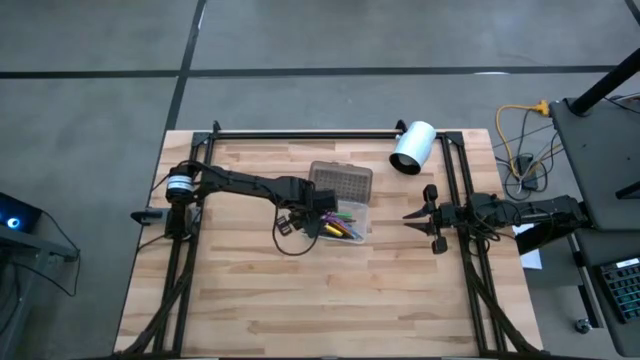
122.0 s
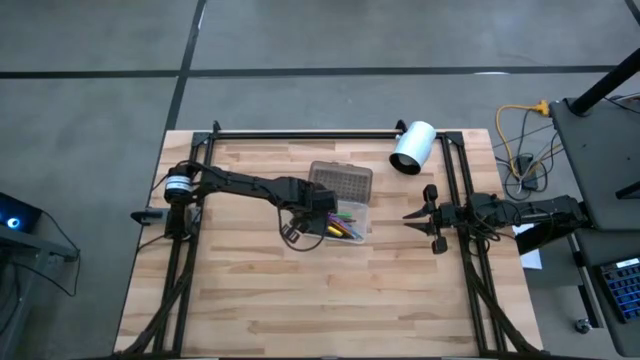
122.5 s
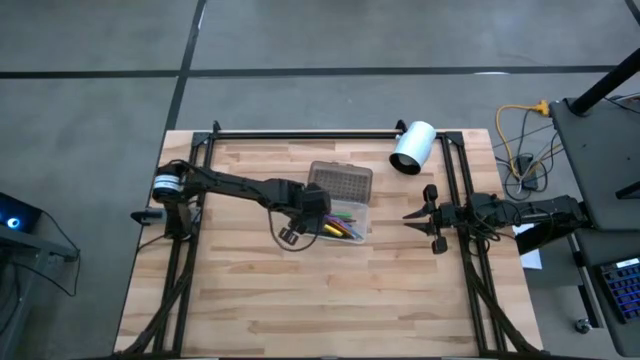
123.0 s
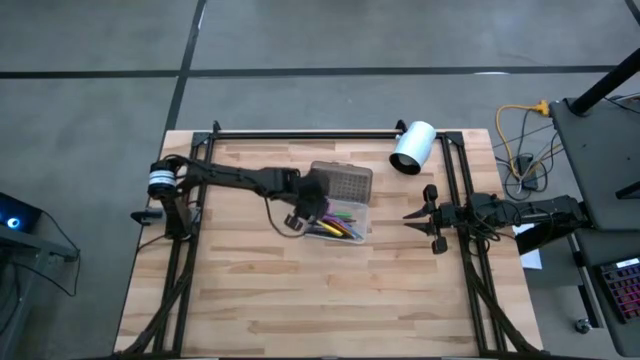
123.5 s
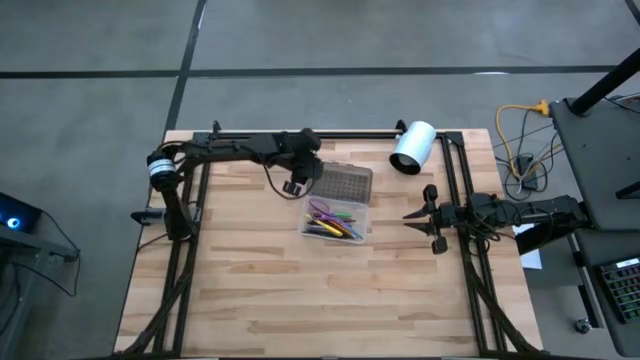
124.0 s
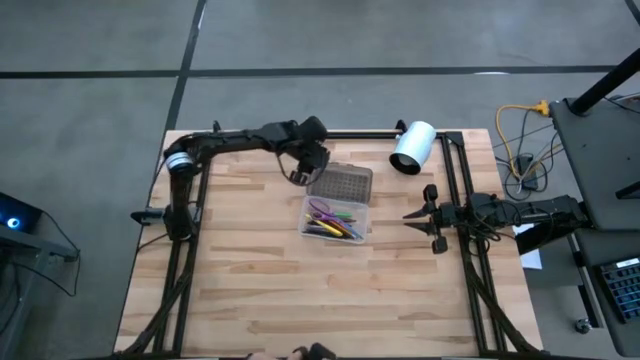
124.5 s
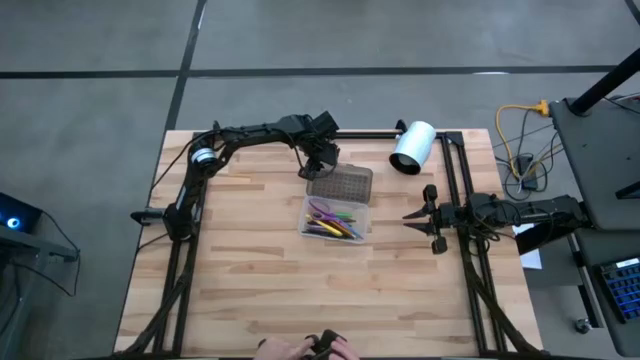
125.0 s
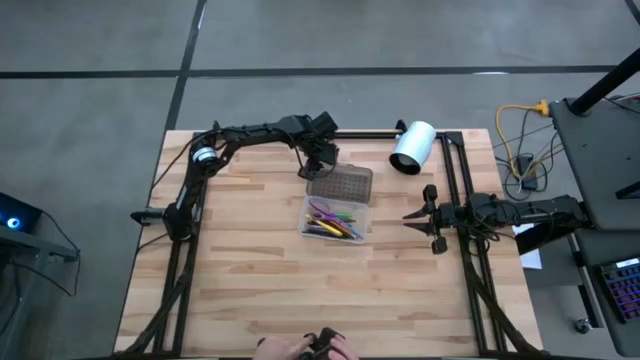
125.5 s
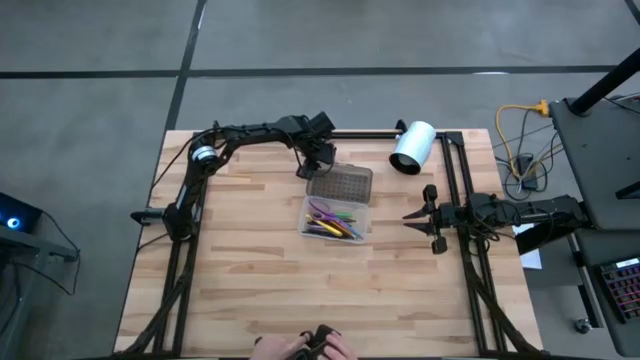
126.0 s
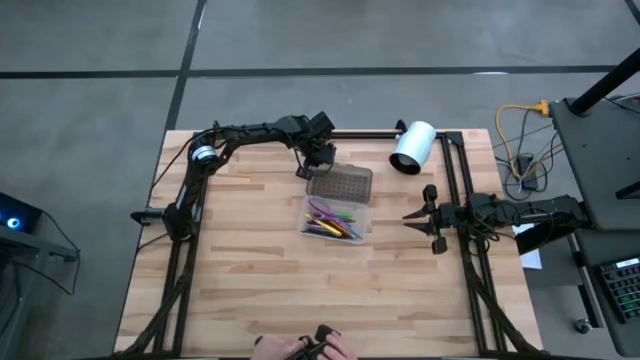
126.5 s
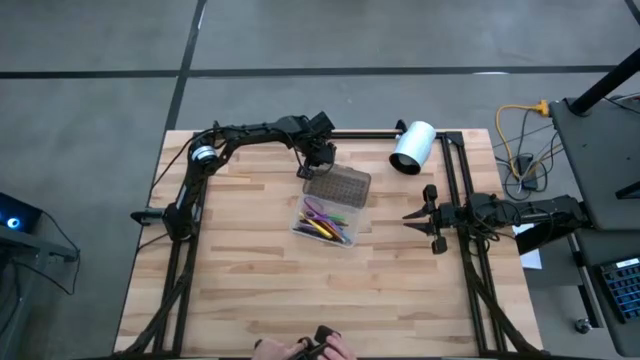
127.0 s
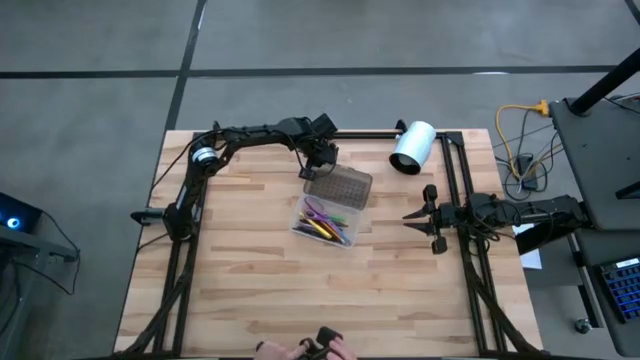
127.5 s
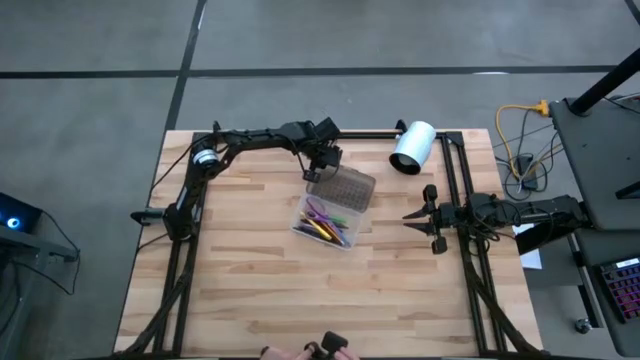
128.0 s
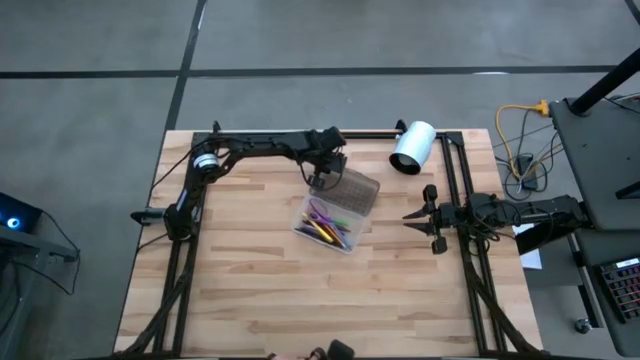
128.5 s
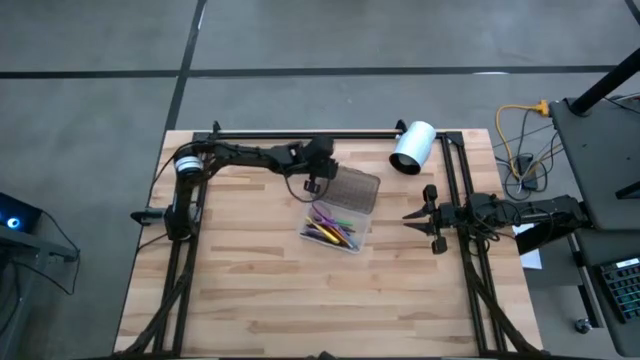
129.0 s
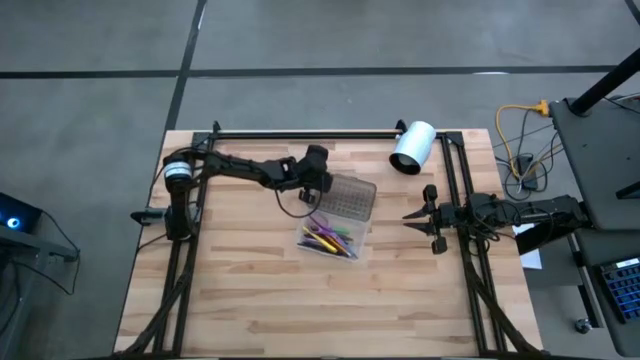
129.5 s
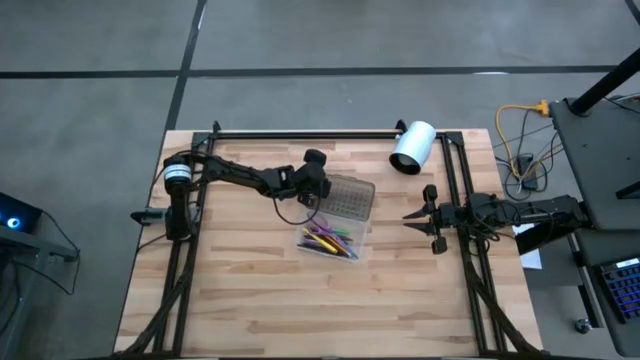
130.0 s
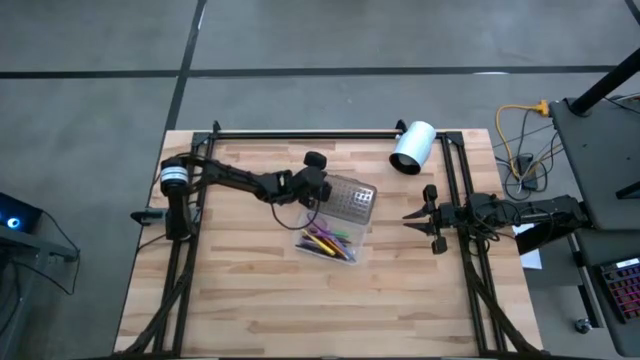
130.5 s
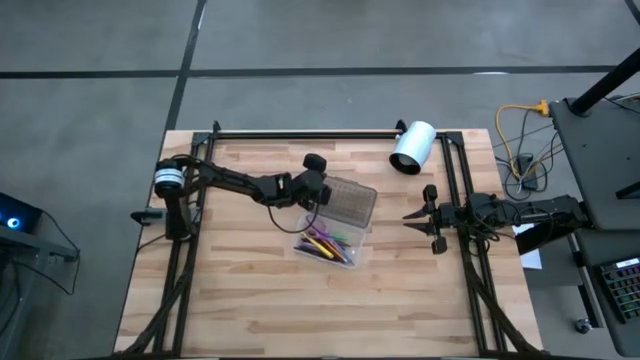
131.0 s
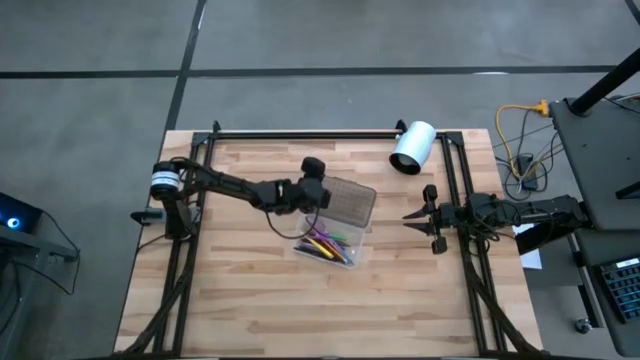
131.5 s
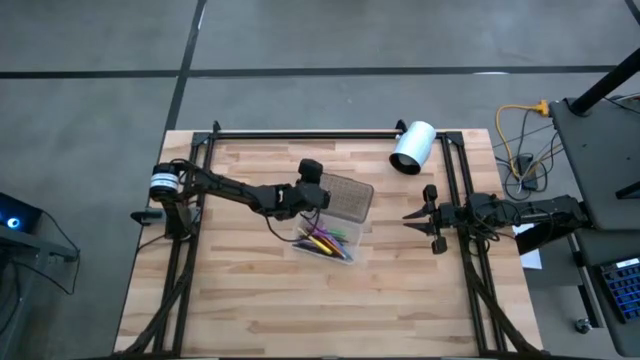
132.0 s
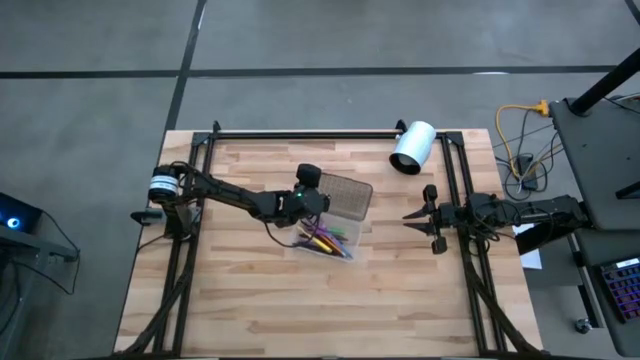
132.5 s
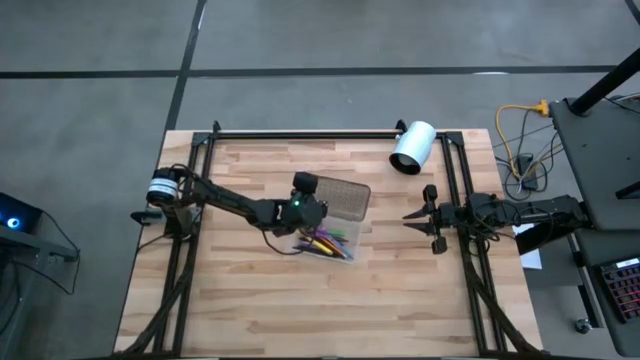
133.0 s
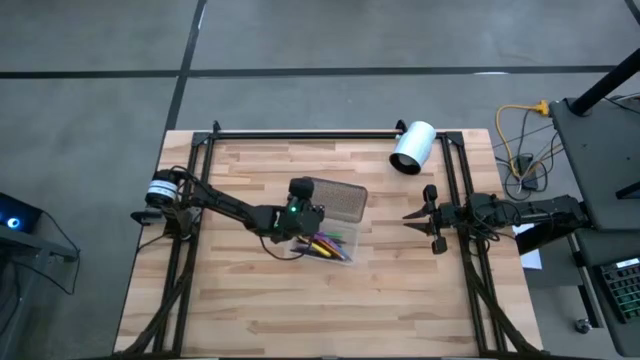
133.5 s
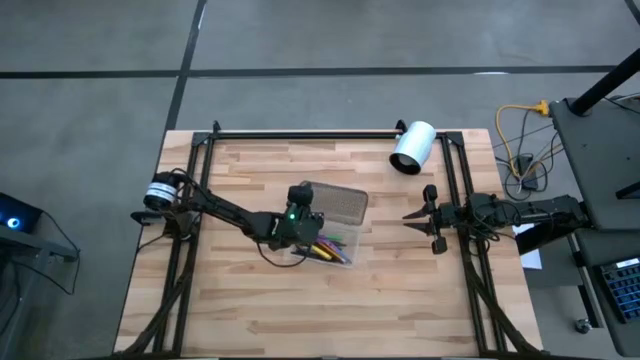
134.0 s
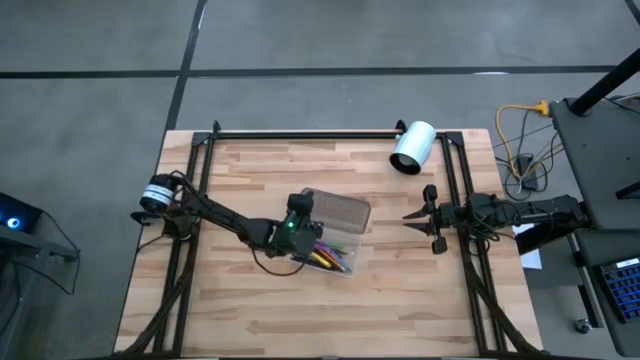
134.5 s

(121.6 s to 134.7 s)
Task: Pick & place school supplies into a supply box
Close the white and black supply box

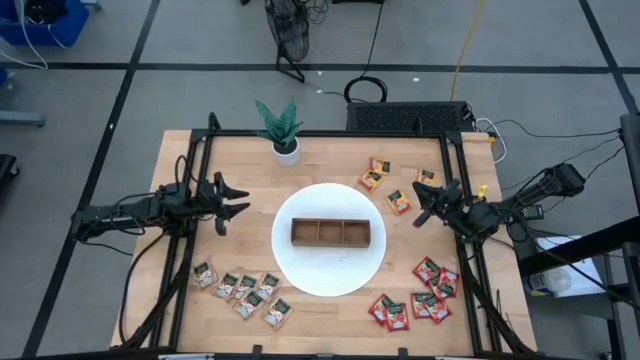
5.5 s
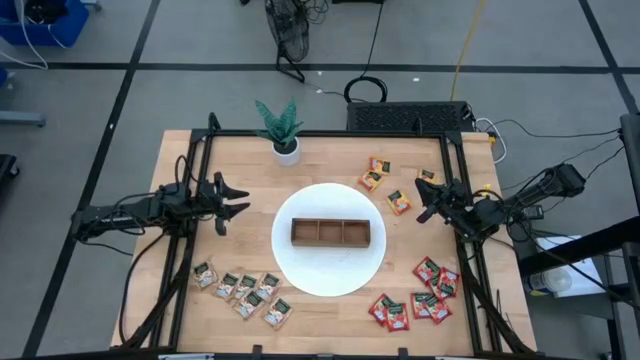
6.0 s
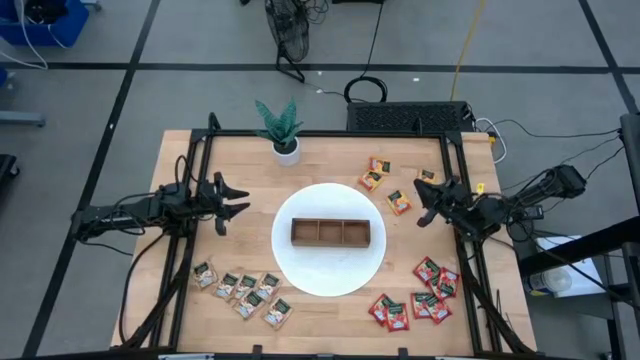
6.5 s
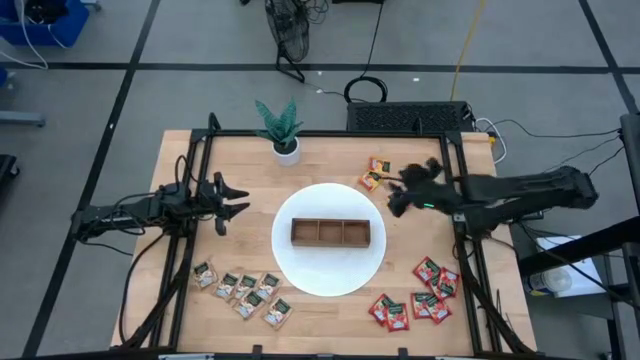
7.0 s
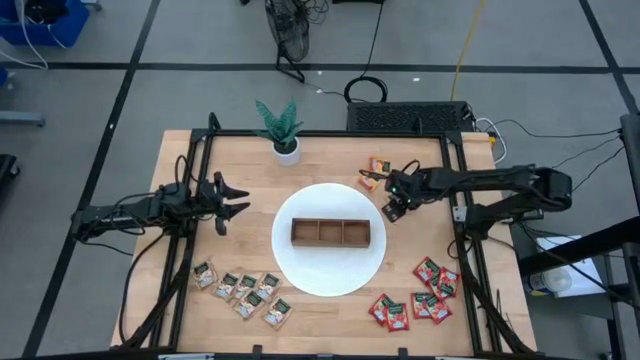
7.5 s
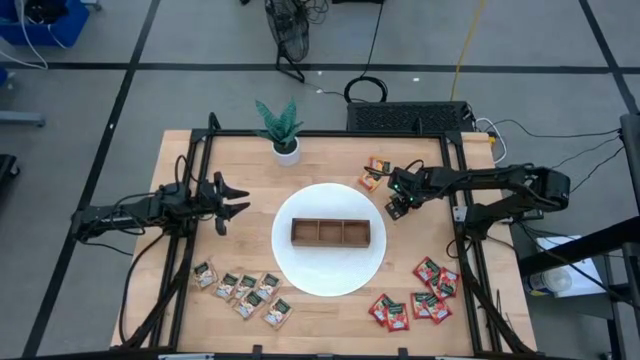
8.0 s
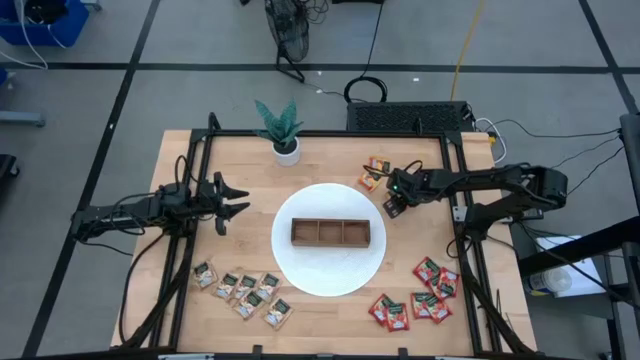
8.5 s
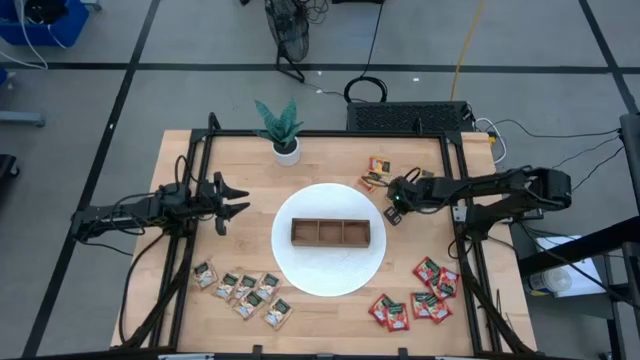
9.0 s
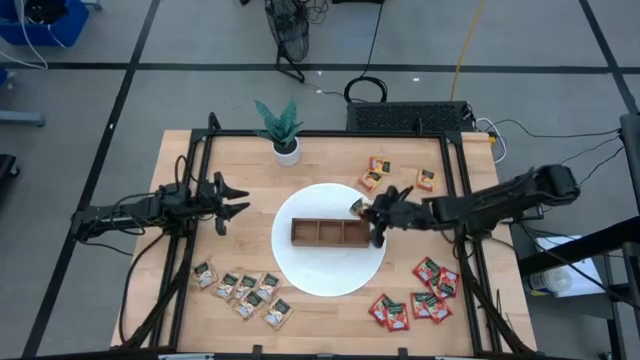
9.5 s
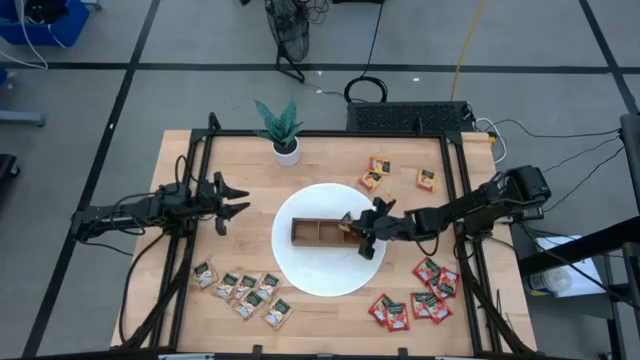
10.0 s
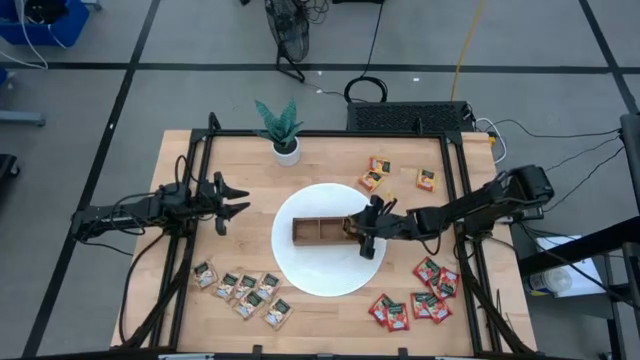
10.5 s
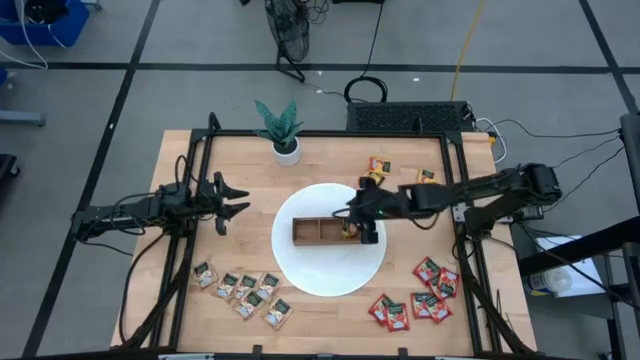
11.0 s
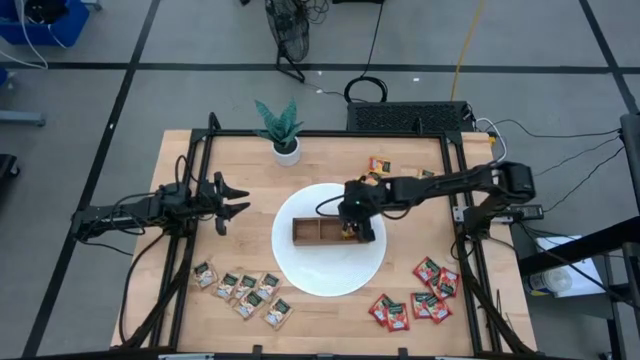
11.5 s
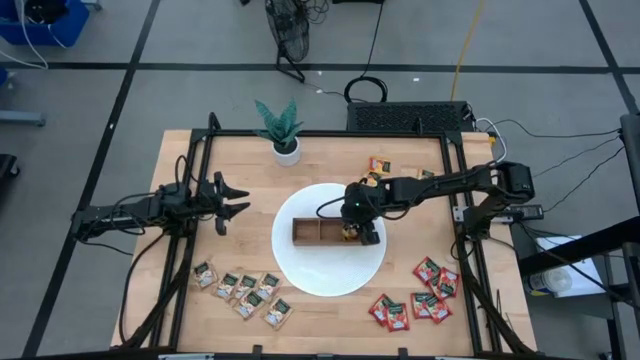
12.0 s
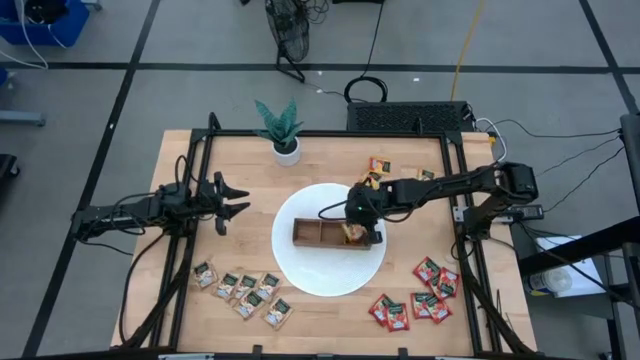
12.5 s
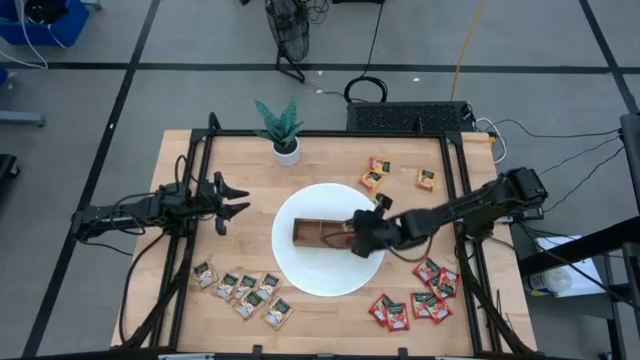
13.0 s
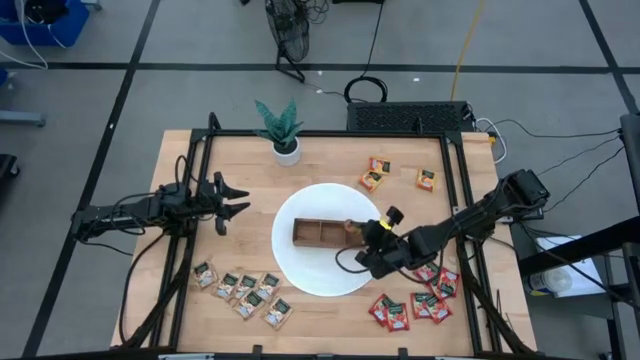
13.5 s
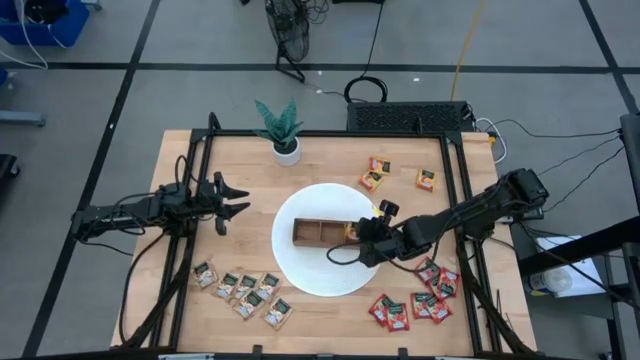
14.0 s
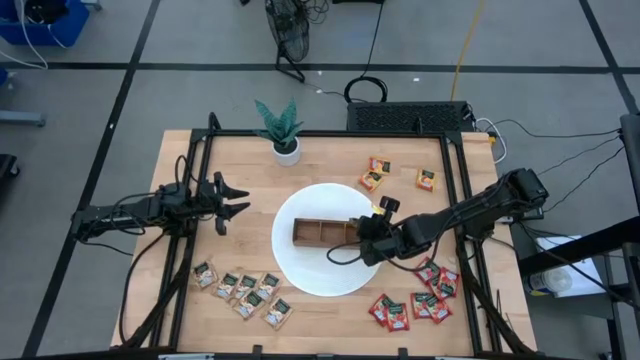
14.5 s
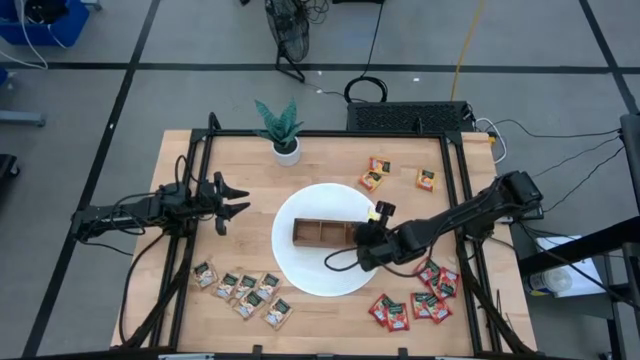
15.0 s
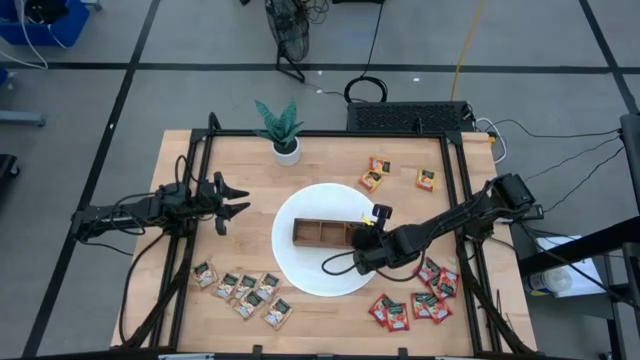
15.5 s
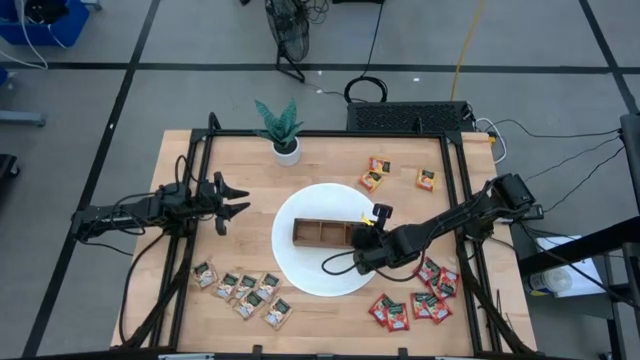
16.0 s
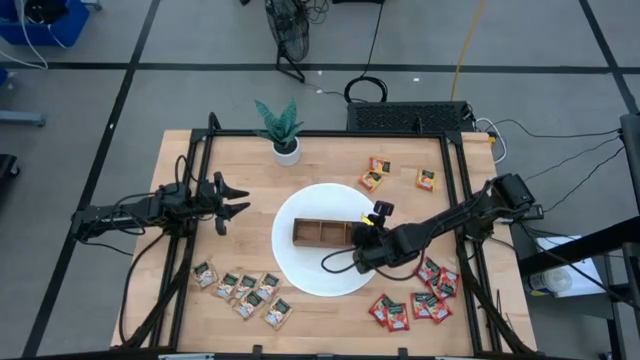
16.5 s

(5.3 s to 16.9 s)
Task: Pick & Place Tea
Put the yellow tea bag into the right section of the wooden organizer
